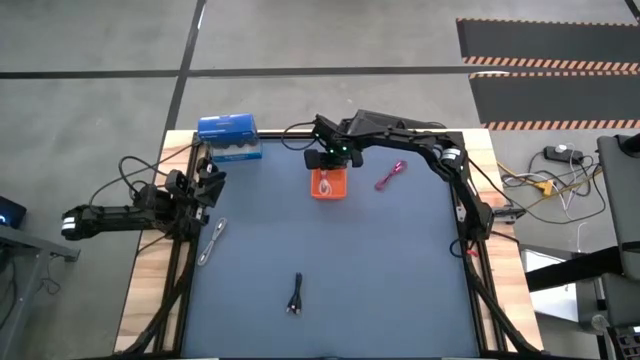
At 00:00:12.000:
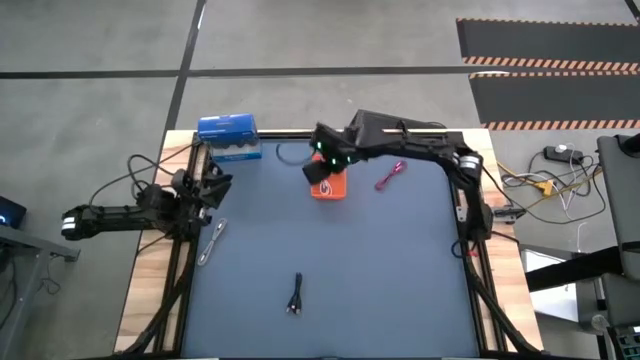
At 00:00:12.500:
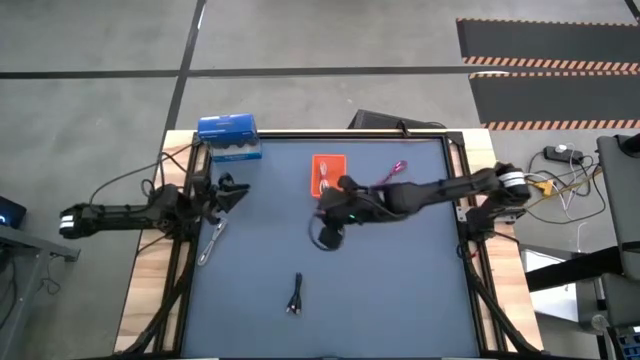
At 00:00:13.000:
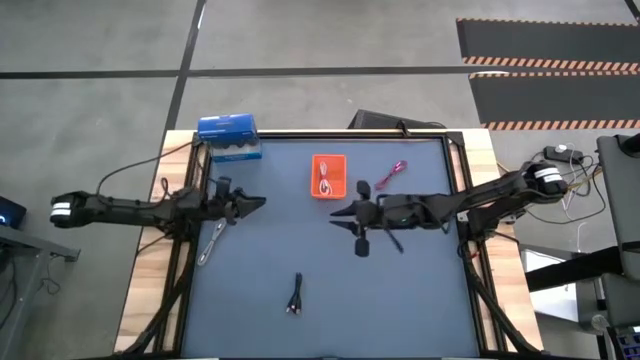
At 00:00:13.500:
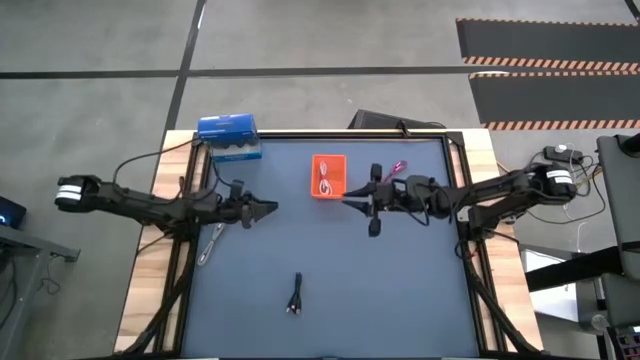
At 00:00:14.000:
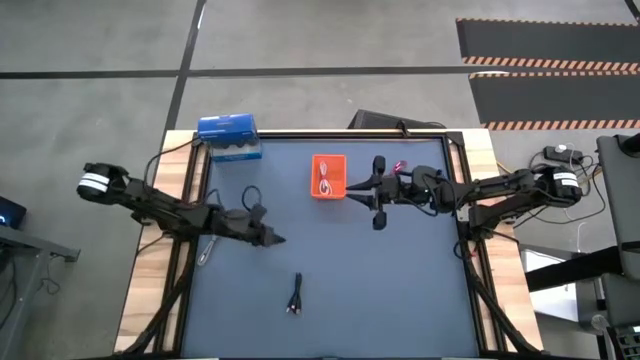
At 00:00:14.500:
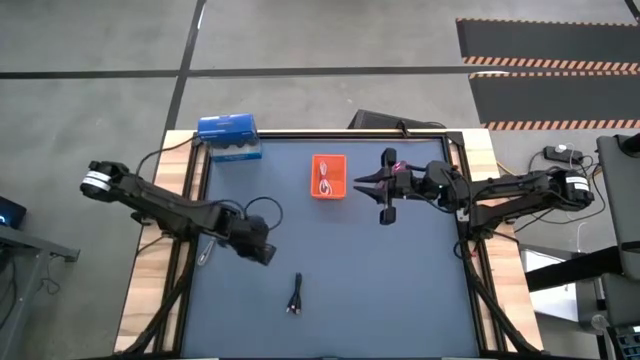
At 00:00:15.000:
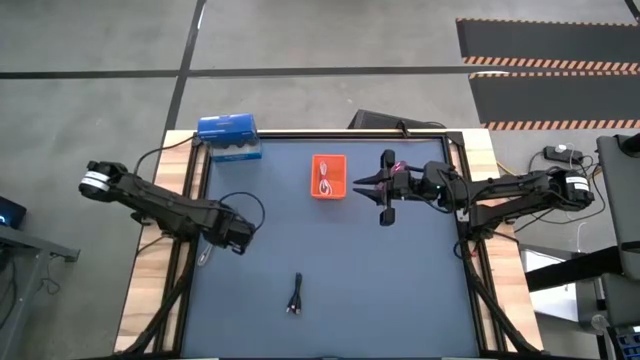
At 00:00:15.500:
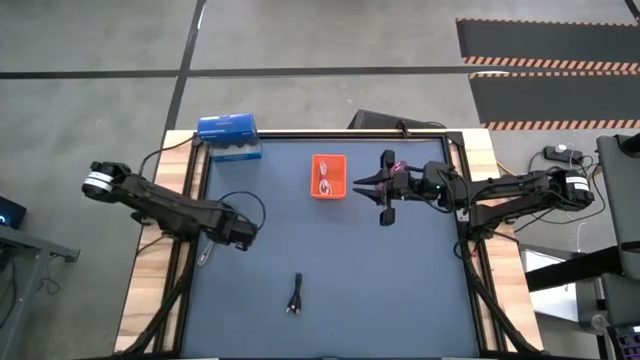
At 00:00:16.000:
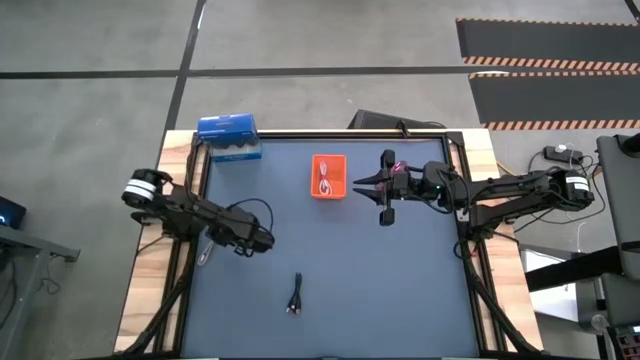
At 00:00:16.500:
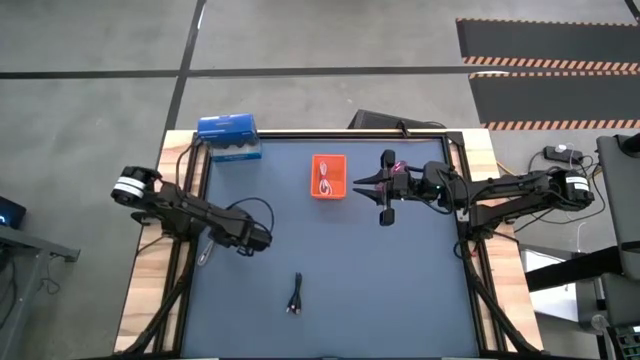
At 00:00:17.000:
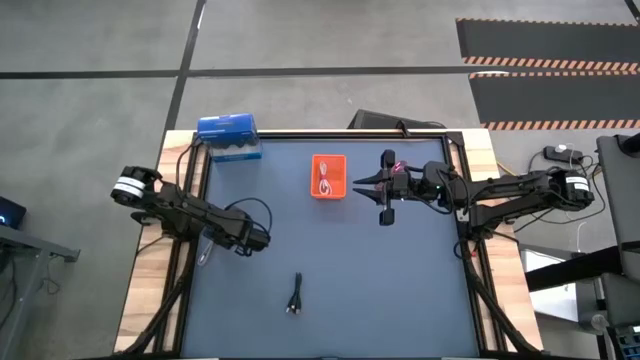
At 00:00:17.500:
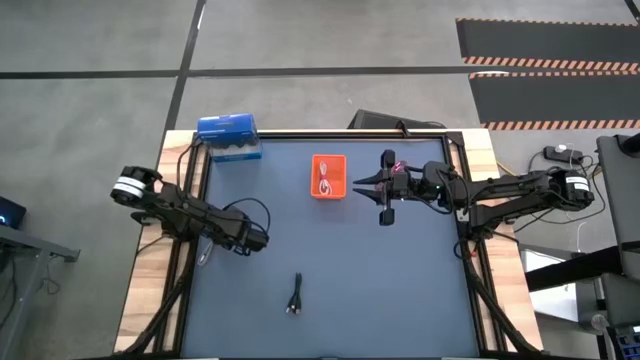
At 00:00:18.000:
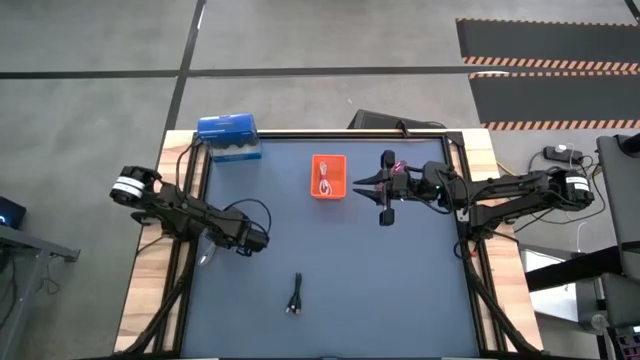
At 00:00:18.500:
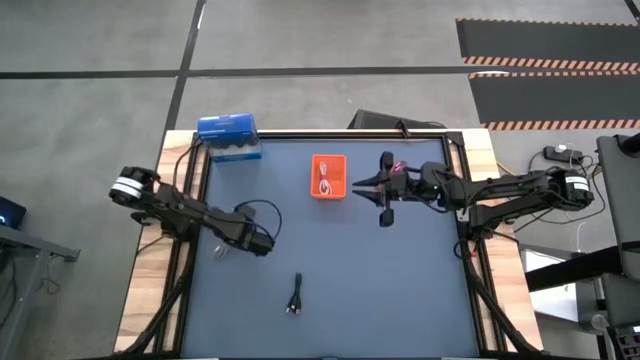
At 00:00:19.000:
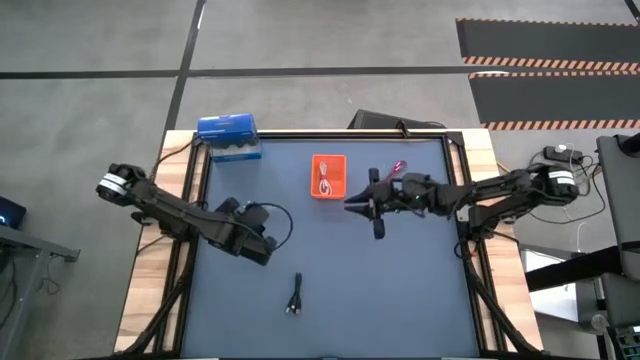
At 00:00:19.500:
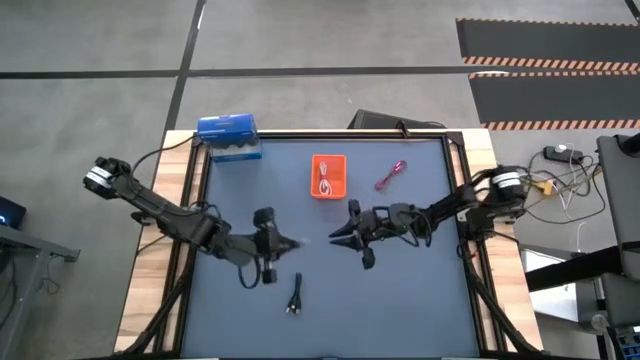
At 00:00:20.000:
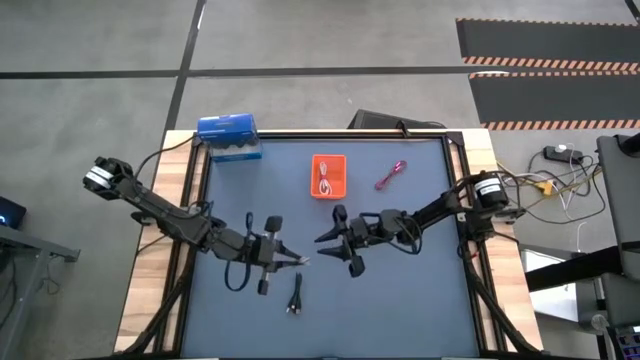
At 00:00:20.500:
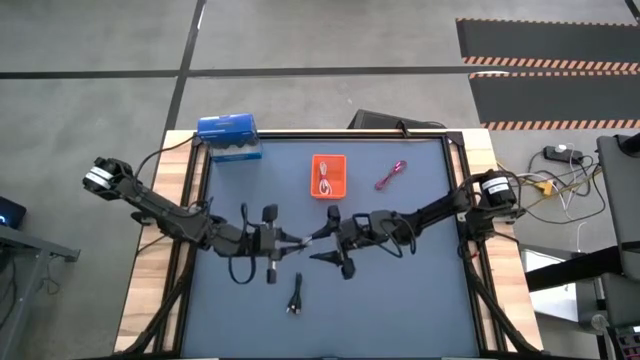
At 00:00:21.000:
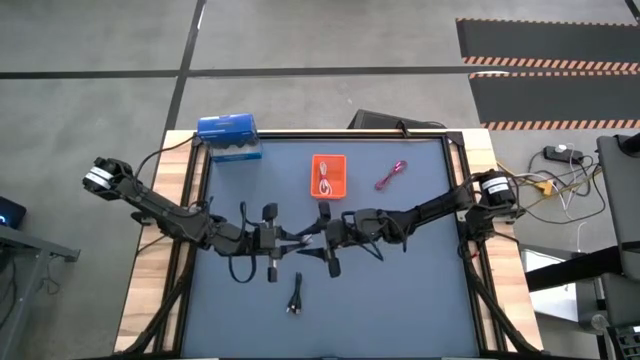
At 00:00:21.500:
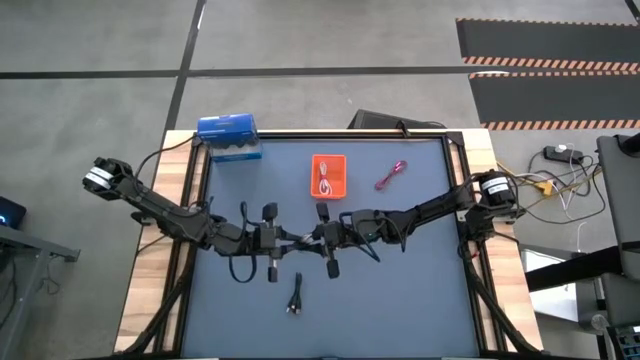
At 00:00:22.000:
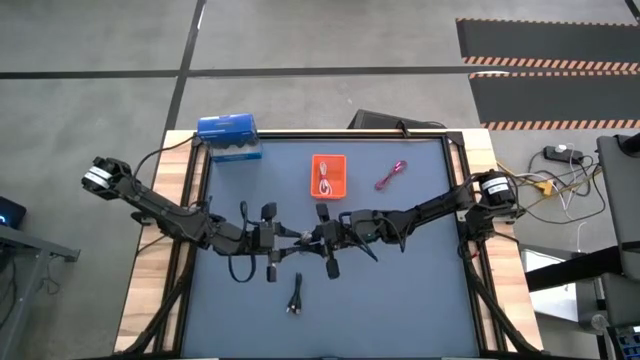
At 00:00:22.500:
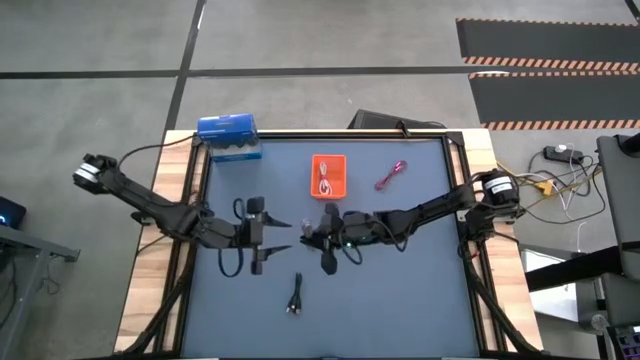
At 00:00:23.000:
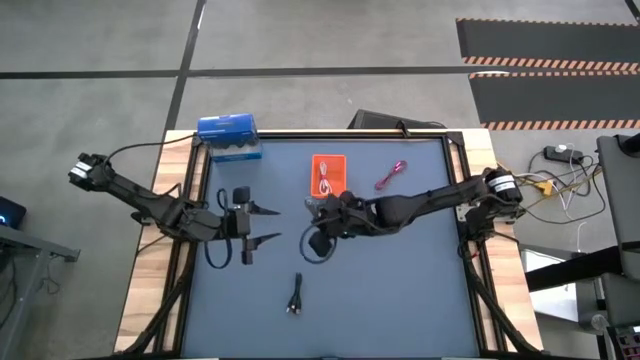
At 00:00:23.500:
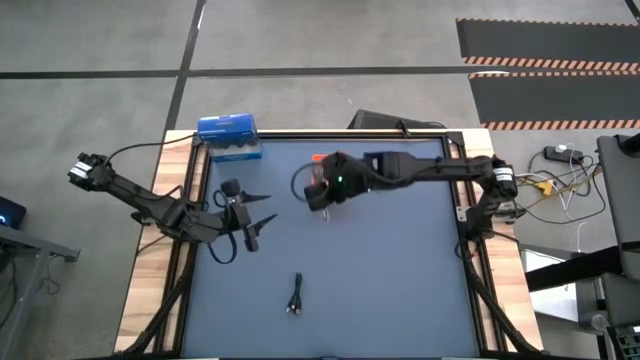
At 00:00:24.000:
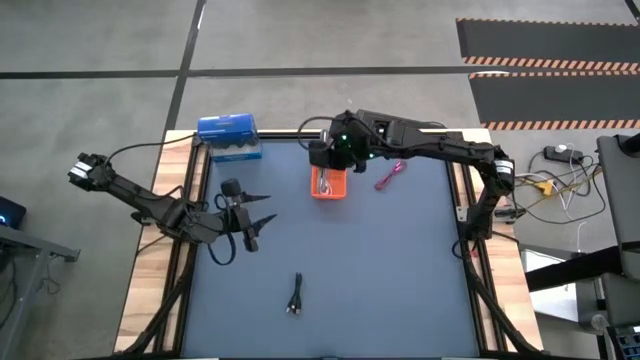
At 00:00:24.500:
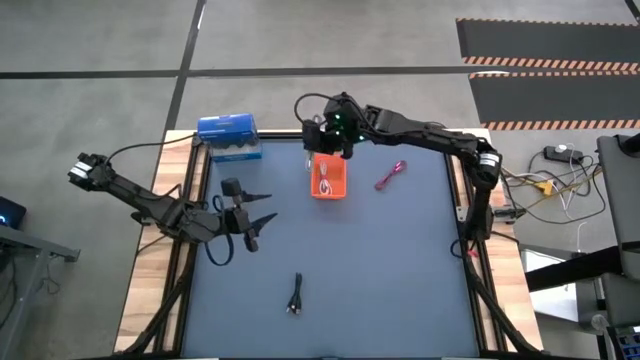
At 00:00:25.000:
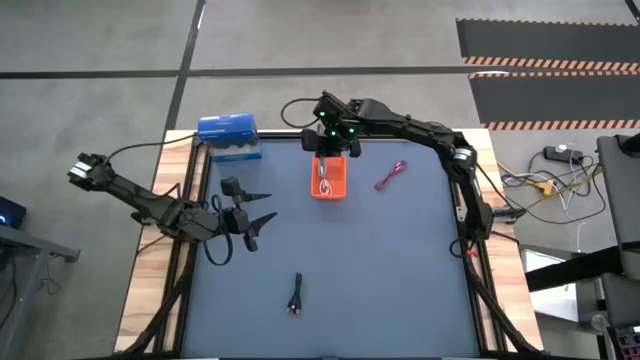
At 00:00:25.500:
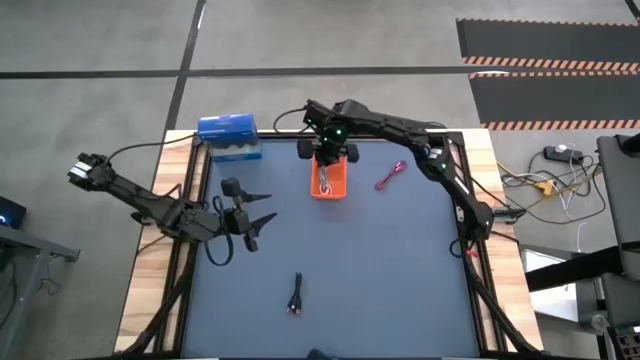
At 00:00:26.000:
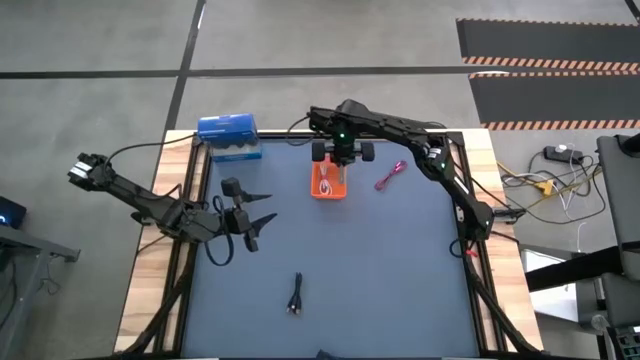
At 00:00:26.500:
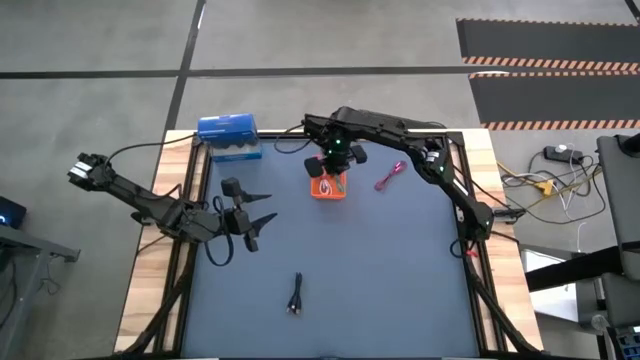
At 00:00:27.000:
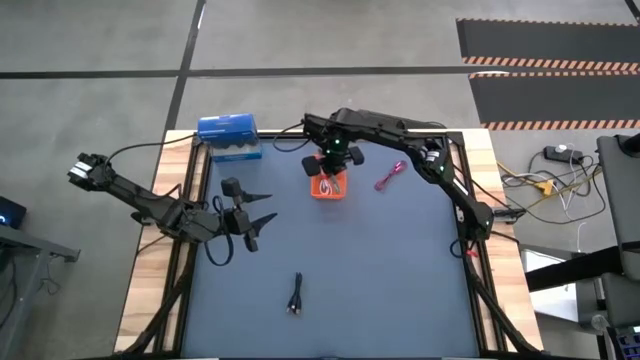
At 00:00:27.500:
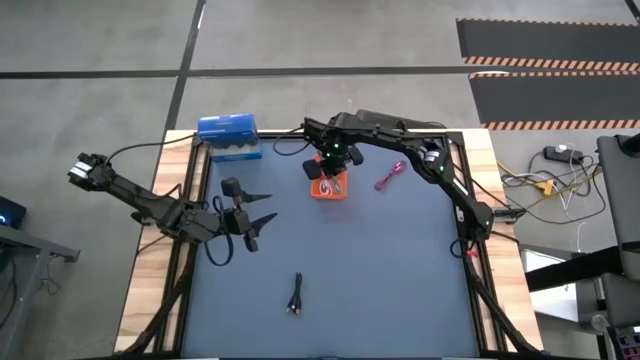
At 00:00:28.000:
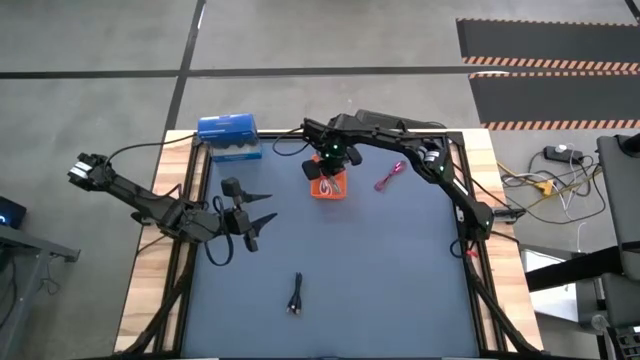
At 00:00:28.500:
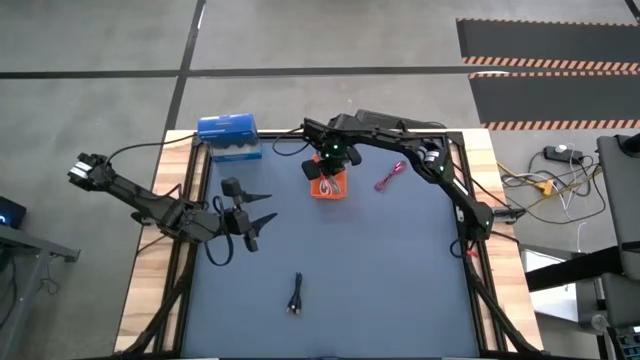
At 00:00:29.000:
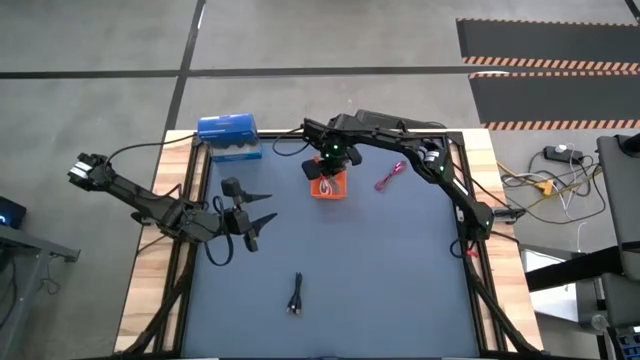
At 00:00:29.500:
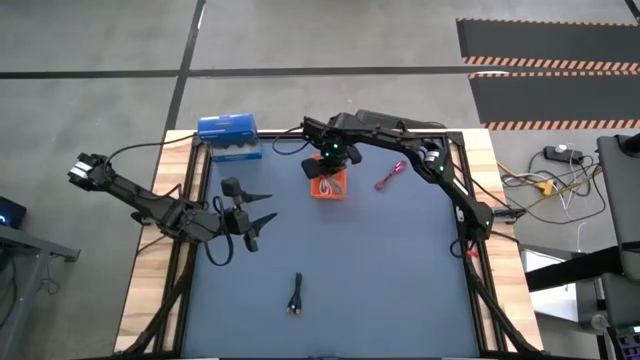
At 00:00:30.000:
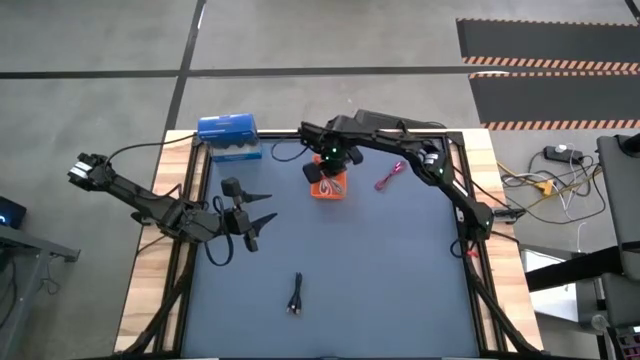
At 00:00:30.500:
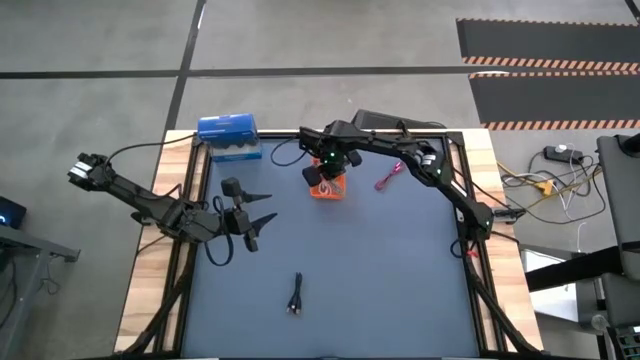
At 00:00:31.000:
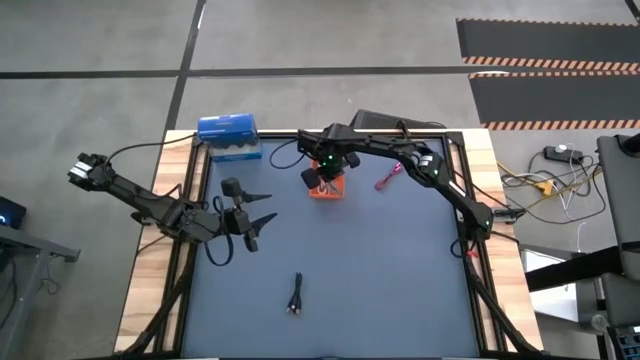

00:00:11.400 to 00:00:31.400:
Task: Pick and place USB-C Cables
Put the black white charger cable into the orange bin
